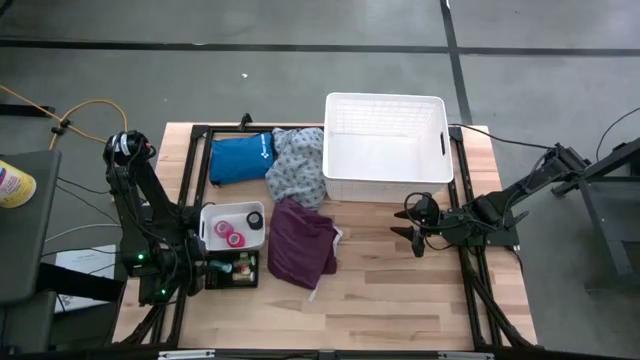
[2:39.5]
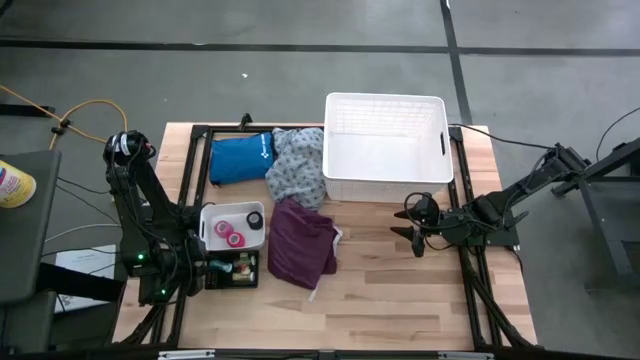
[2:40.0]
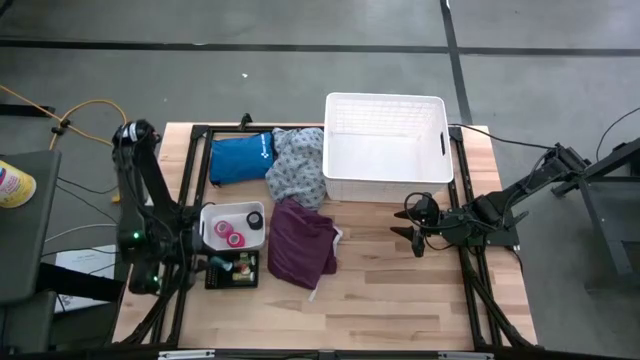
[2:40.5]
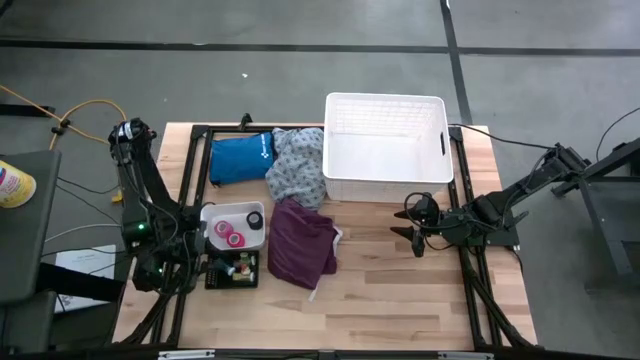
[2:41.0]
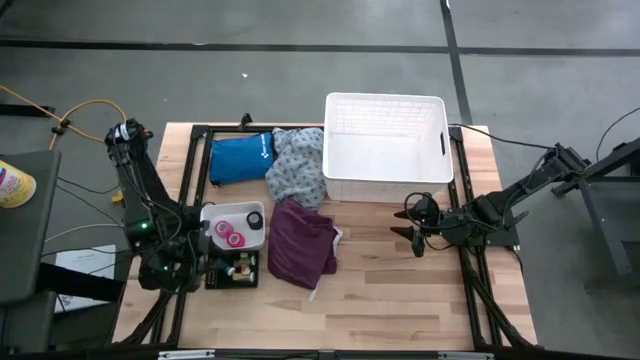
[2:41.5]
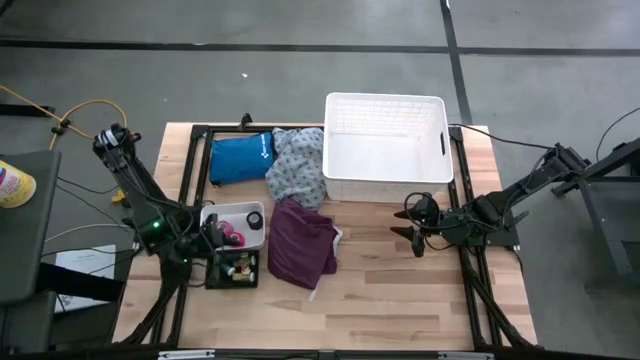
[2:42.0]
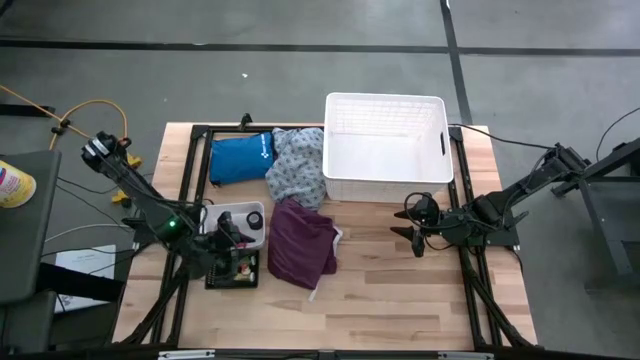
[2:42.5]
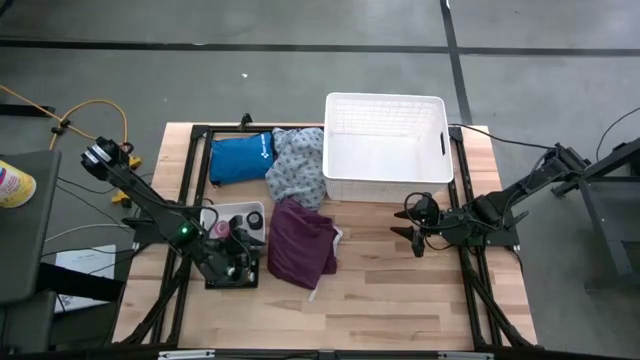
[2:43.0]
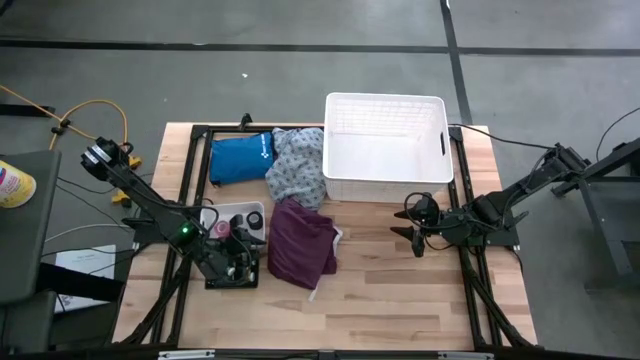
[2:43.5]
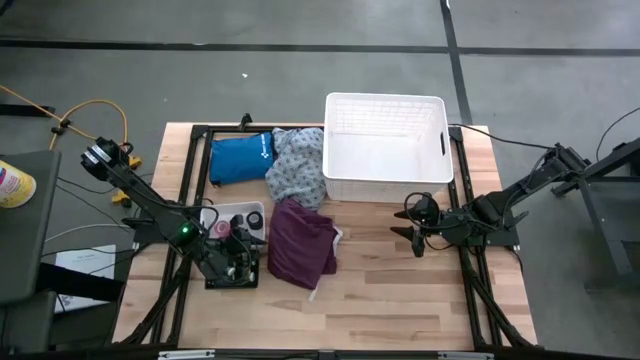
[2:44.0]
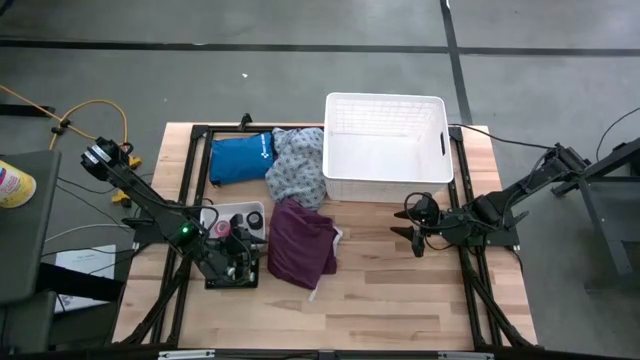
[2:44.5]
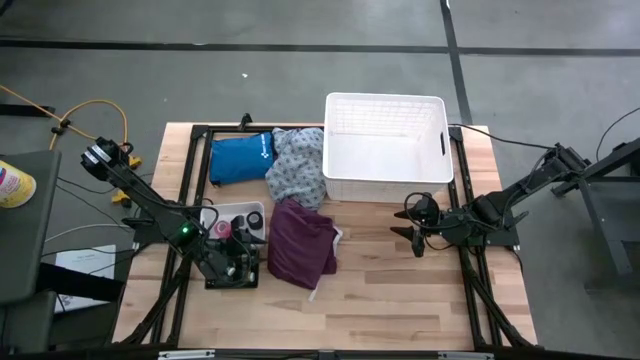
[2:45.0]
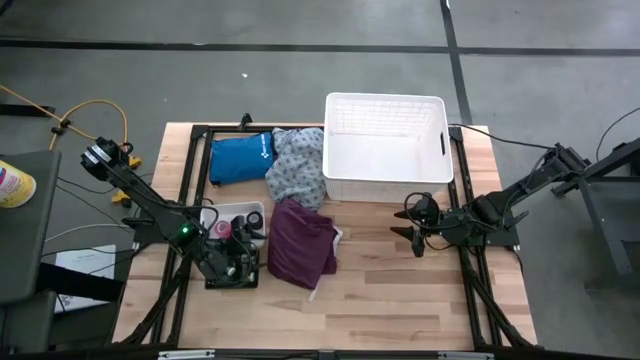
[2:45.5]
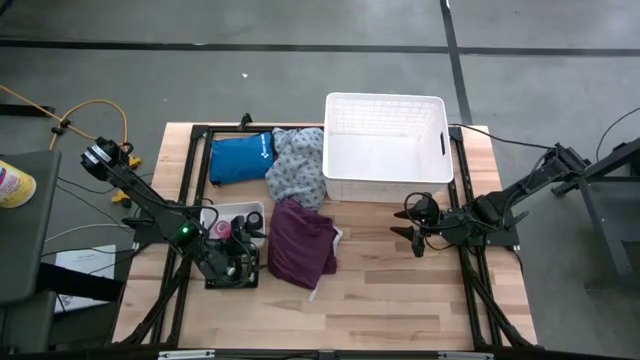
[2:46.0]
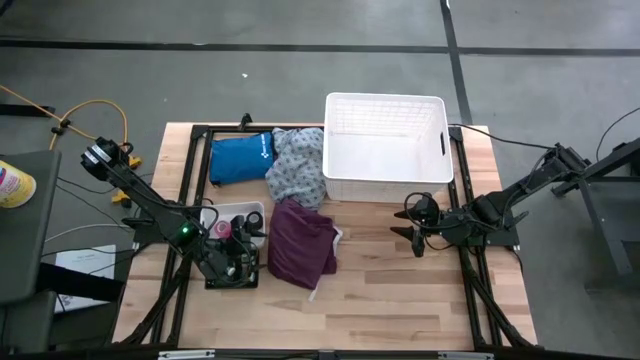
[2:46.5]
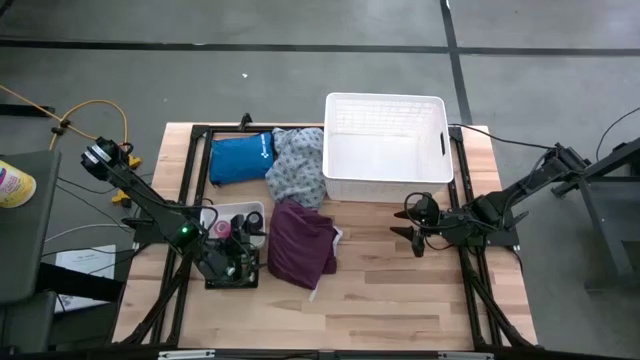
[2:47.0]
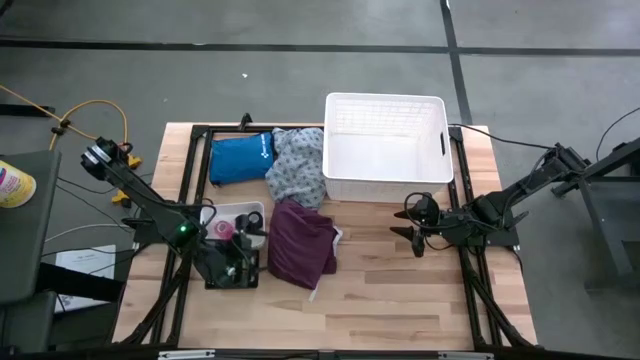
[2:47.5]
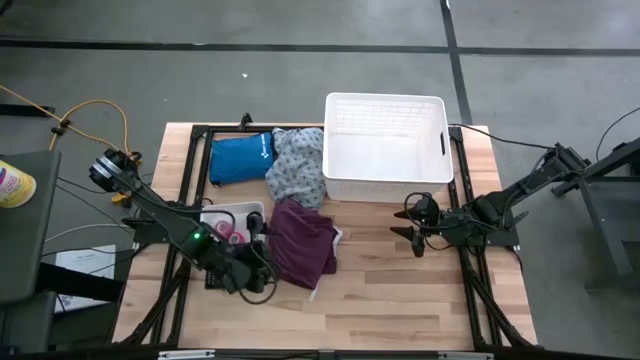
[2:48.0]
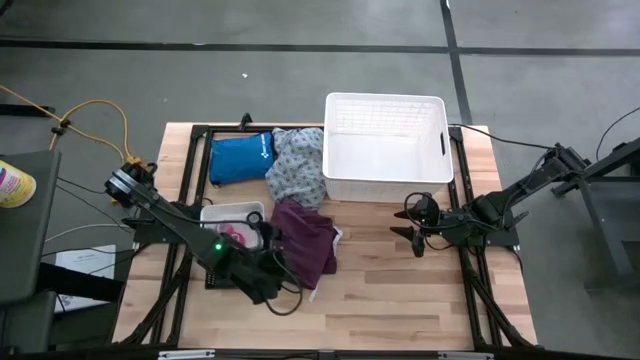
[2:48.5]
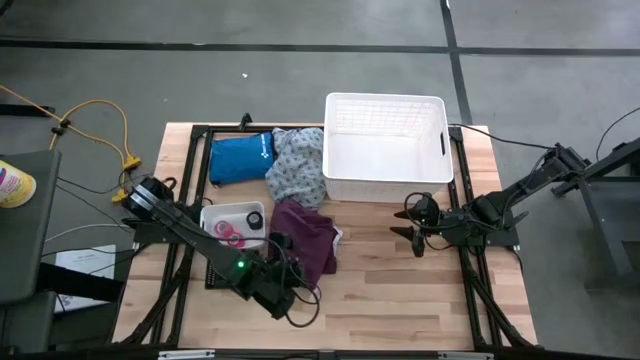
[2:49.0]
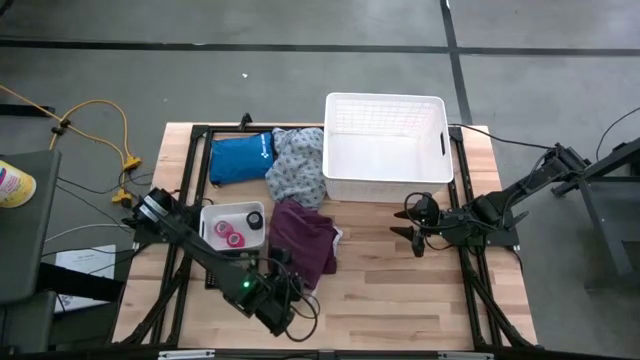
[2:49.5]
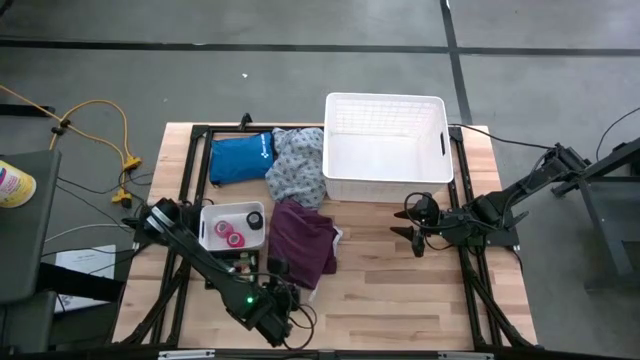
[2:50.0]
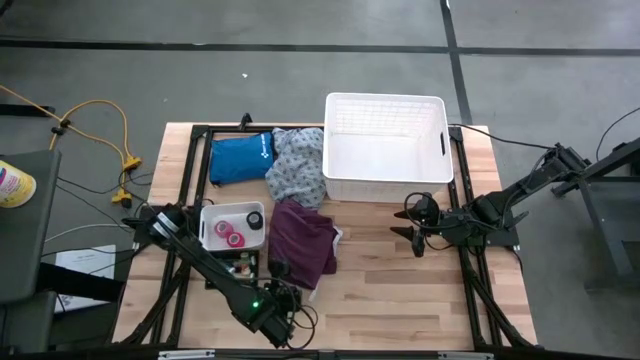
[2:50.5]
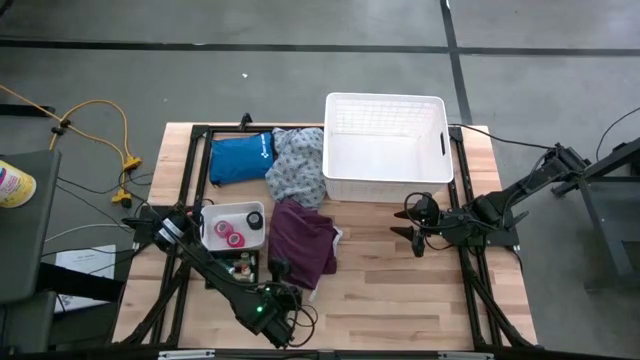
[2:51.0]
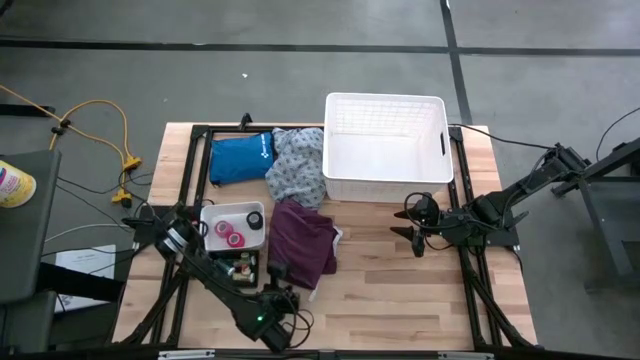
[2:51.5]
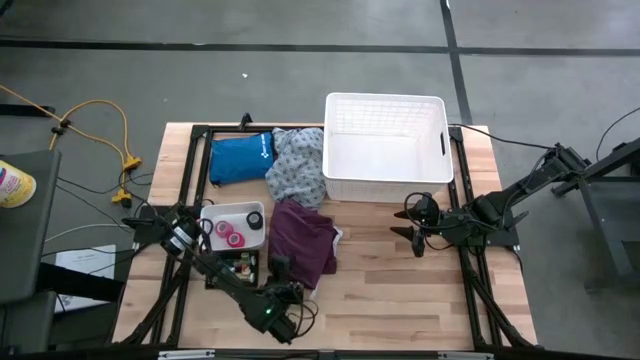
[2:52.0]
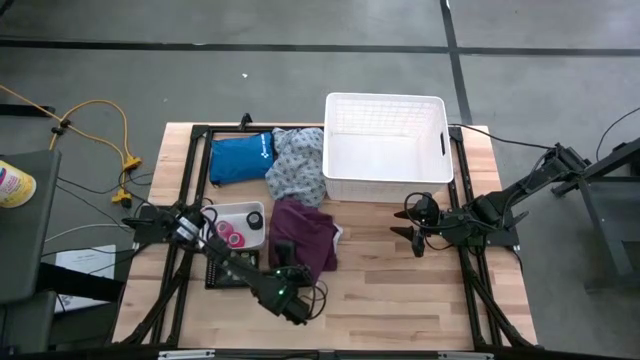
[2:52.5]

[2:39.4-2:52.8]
Task: Pick & place medical supplies in basket/bin
Put the red patient gown into the white bin

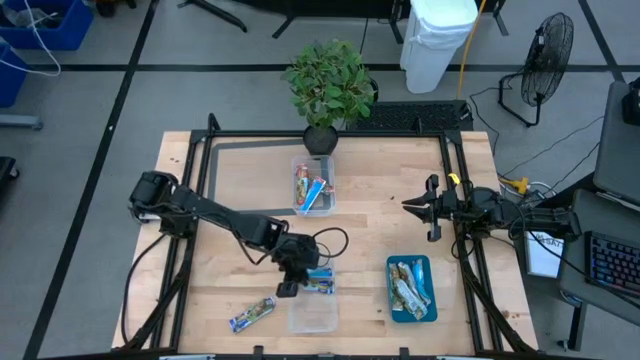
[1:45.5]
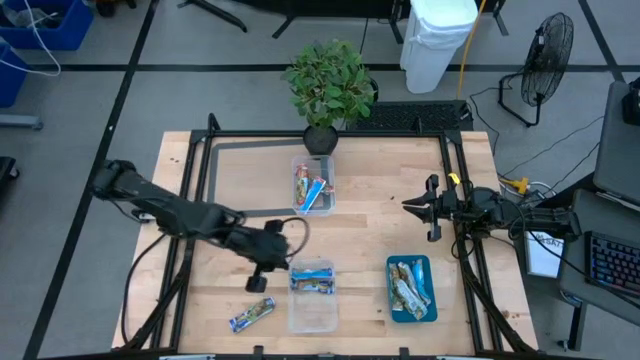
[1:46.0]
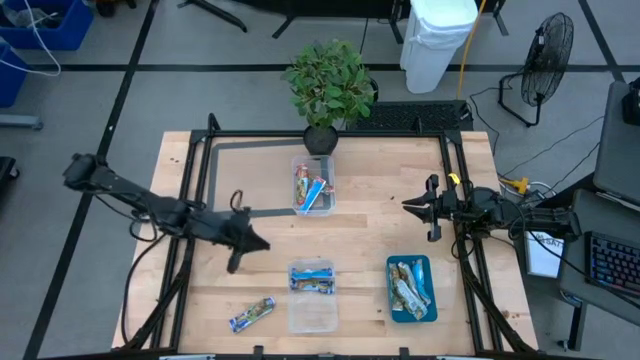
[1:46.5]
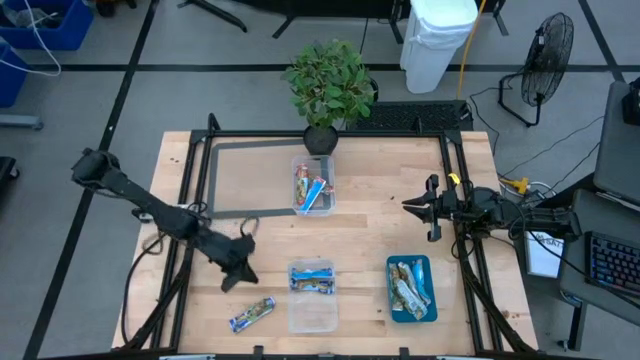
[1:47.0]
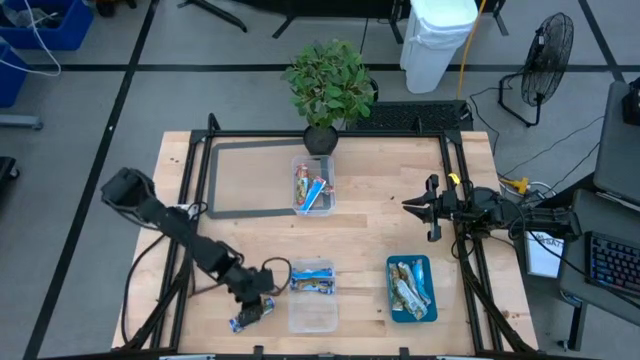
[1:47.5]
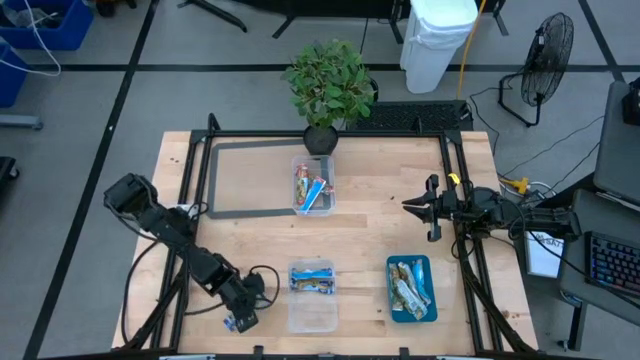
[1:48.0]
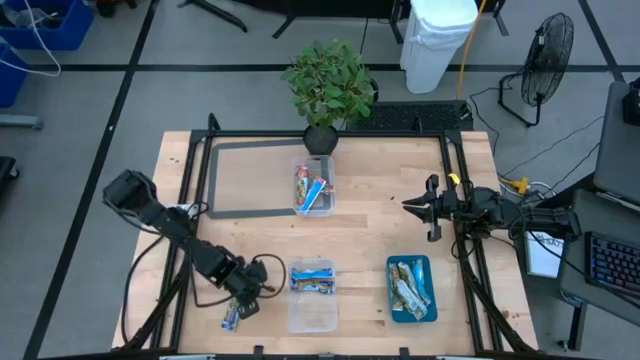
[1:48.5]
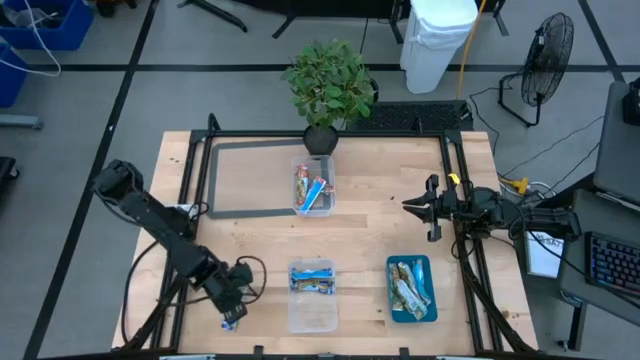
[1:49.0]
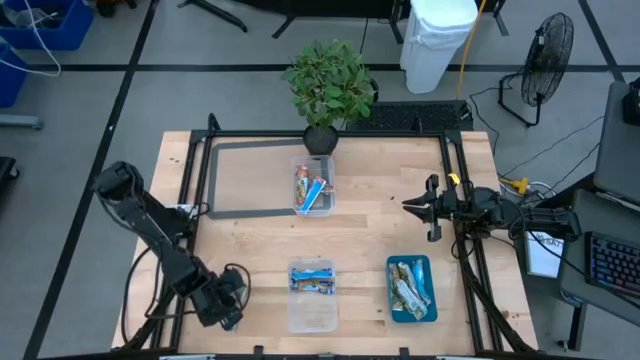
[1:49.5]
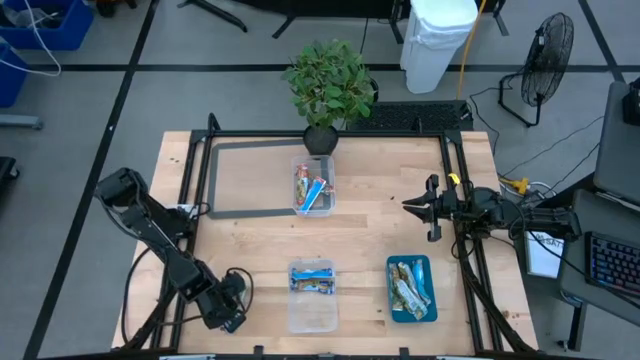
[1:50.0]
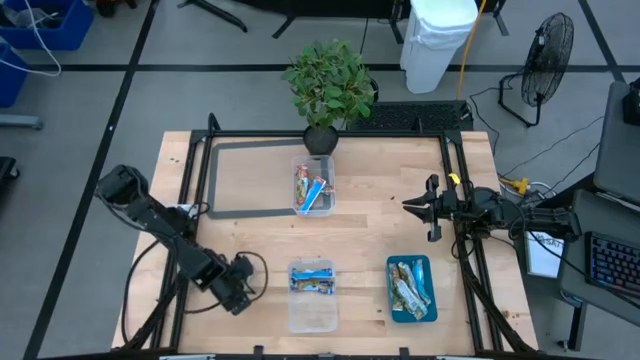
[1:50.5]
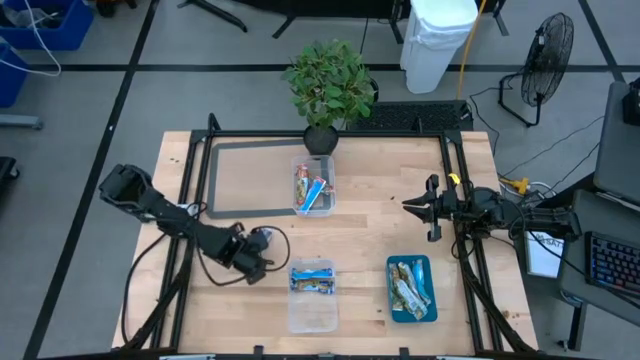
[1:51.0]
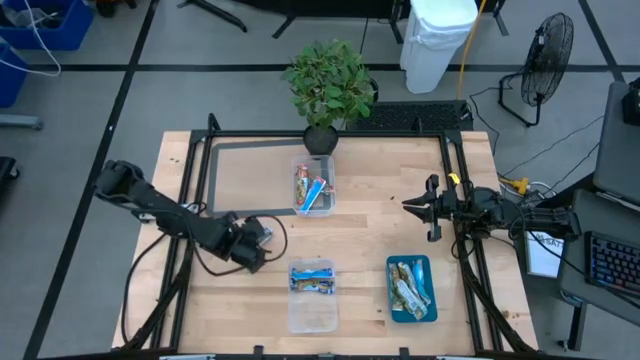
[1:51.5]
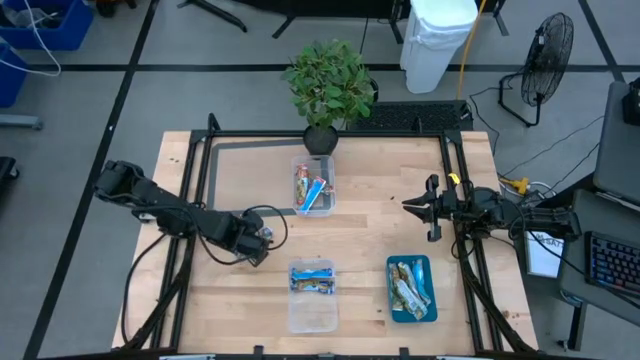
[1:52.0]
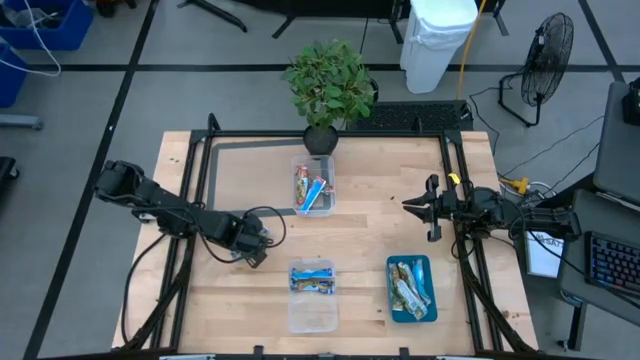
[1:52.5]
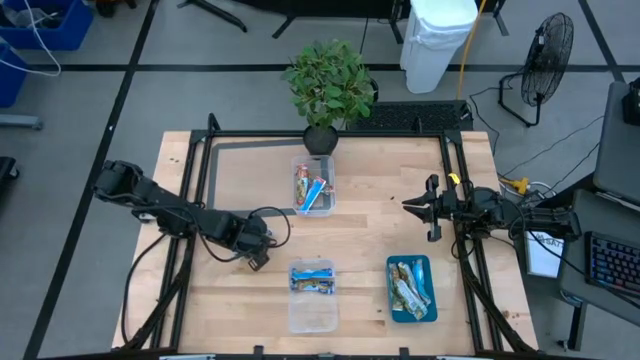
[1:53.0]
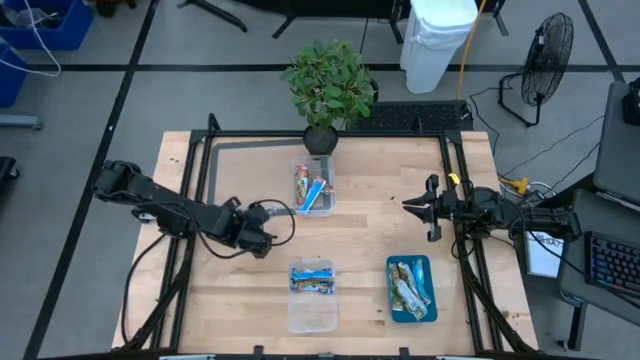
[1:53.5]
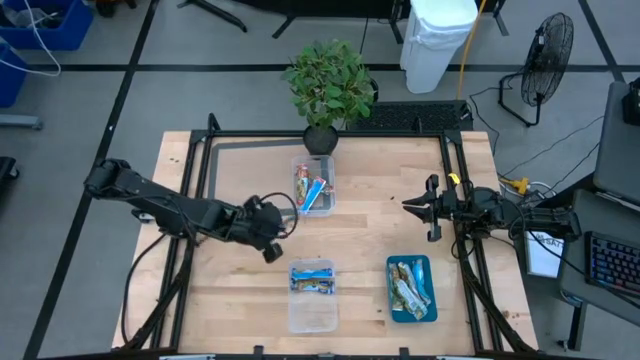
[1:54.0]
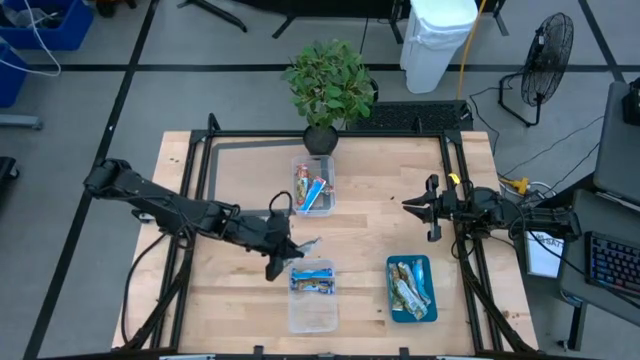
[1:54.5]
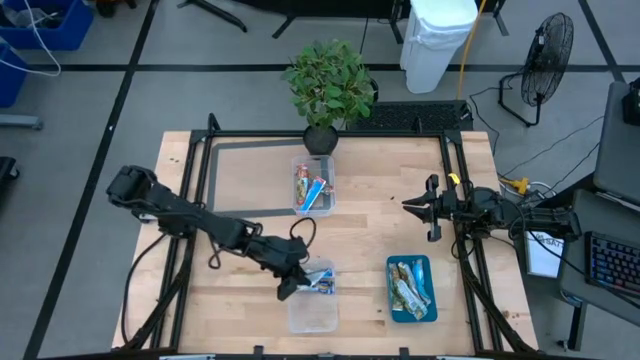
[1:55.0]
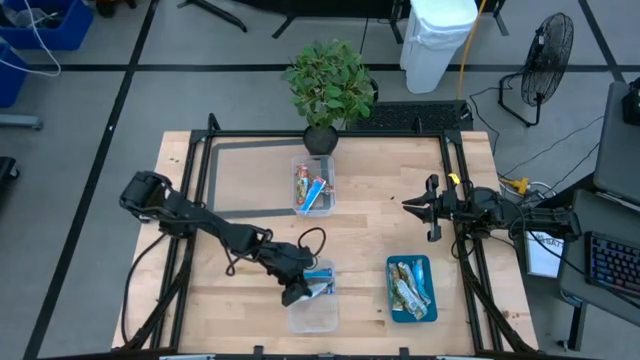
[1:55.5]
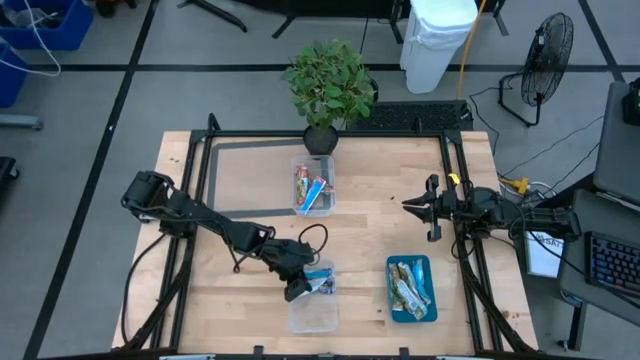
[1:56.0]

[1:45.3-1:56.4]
Task: Pick and place Granola Bars by type
Put the blue granola bar into the bottom transparent bin
